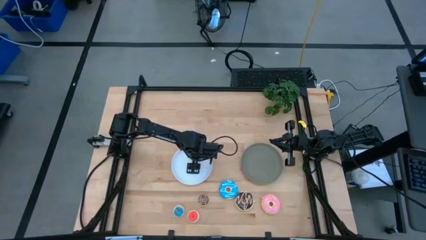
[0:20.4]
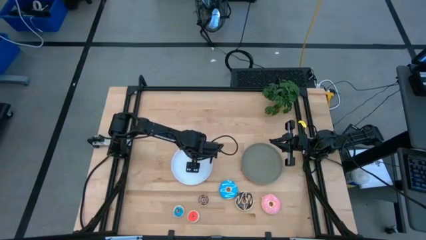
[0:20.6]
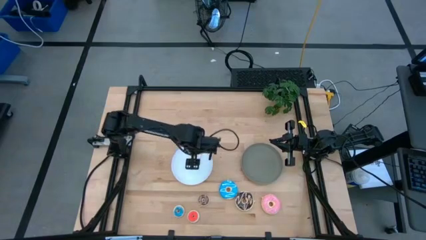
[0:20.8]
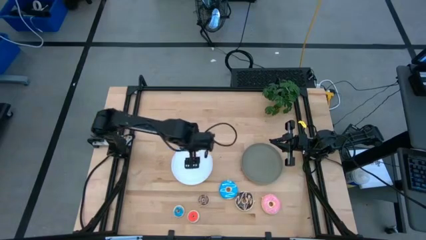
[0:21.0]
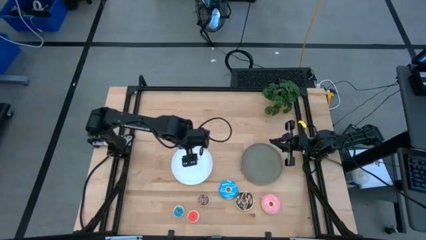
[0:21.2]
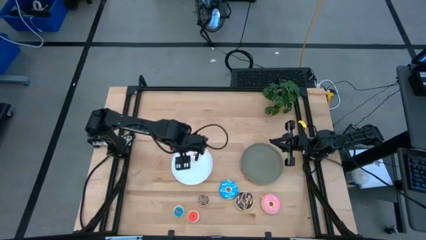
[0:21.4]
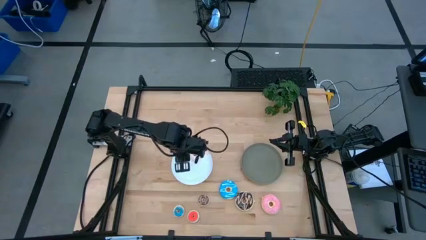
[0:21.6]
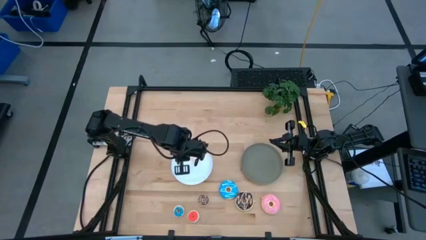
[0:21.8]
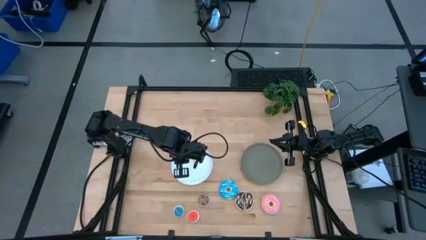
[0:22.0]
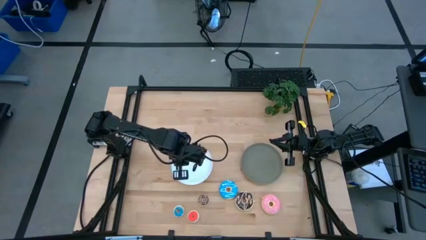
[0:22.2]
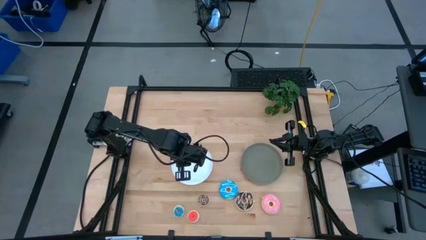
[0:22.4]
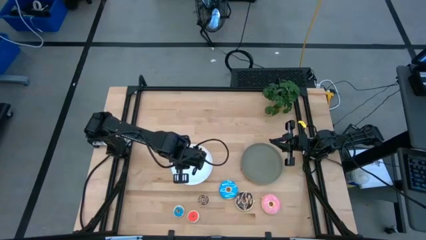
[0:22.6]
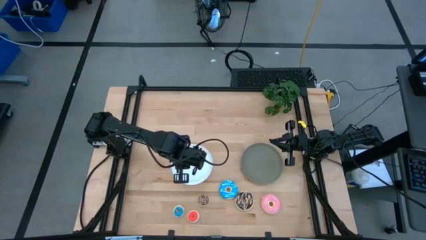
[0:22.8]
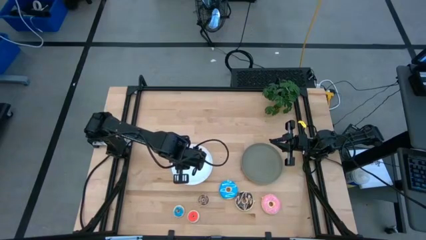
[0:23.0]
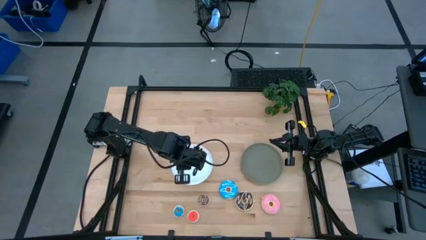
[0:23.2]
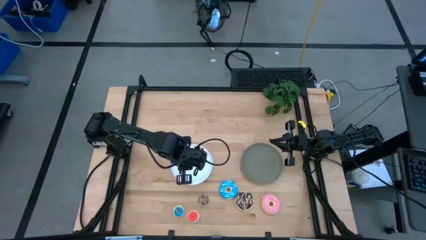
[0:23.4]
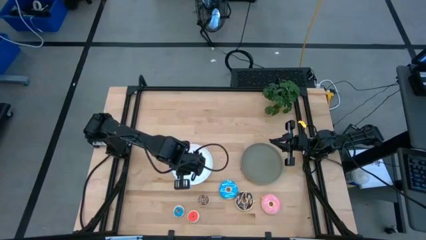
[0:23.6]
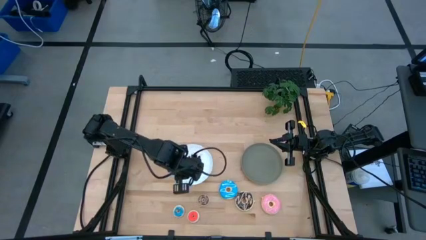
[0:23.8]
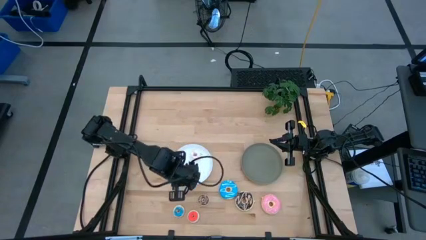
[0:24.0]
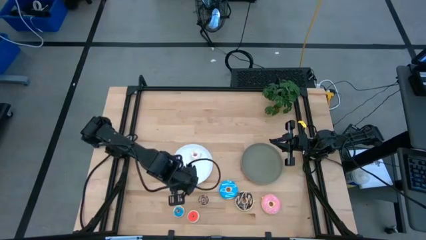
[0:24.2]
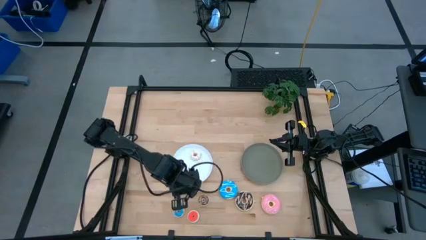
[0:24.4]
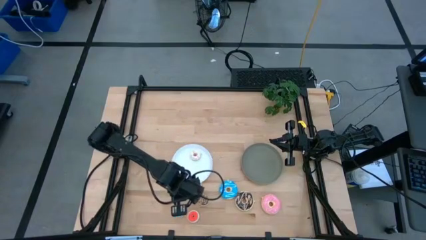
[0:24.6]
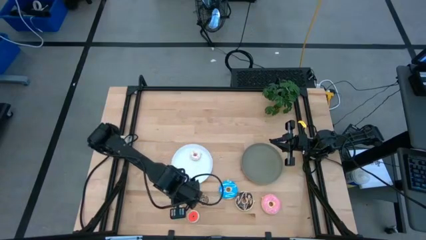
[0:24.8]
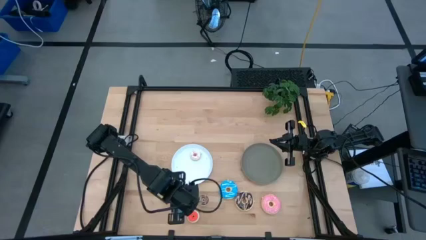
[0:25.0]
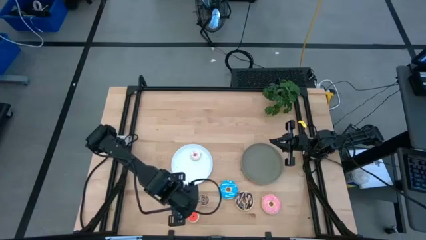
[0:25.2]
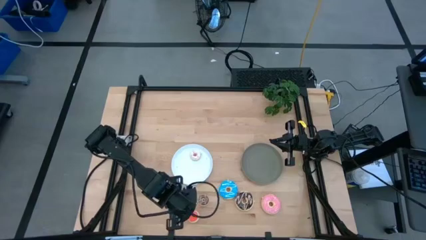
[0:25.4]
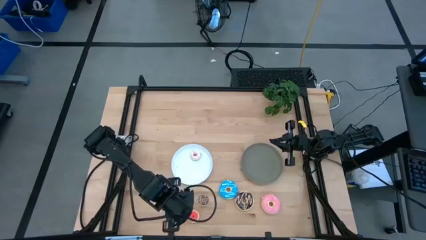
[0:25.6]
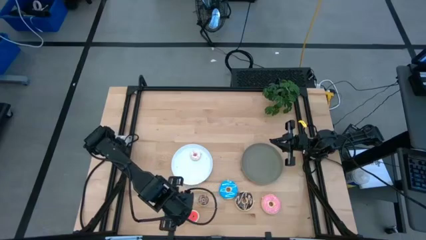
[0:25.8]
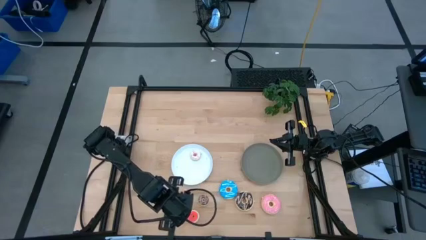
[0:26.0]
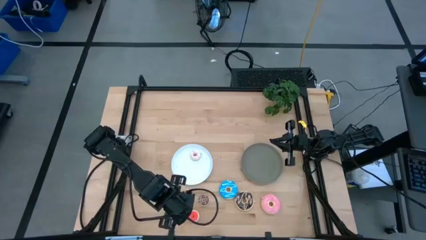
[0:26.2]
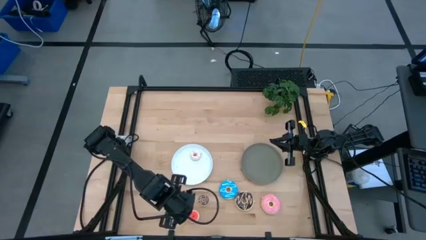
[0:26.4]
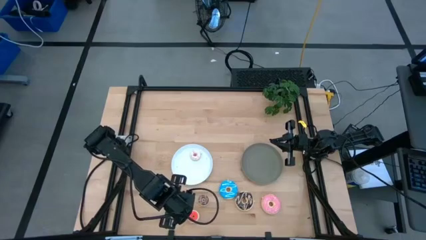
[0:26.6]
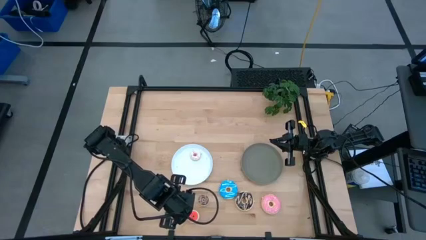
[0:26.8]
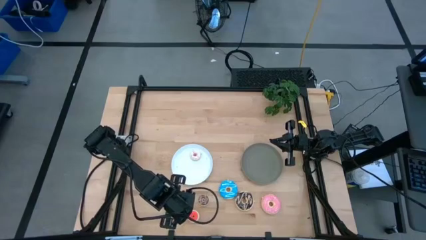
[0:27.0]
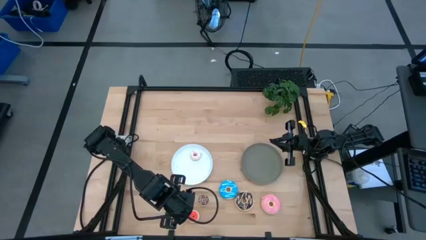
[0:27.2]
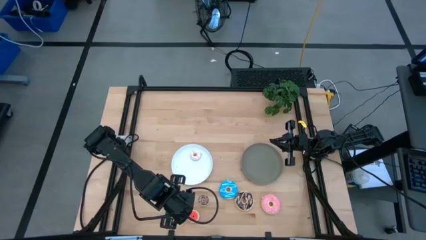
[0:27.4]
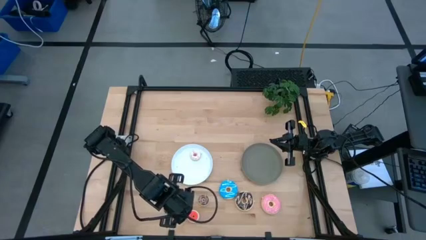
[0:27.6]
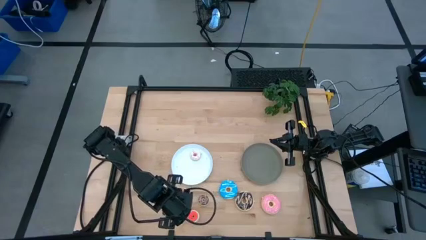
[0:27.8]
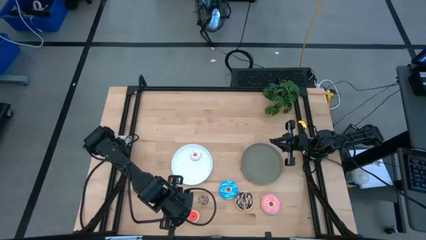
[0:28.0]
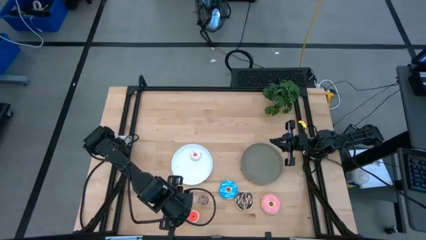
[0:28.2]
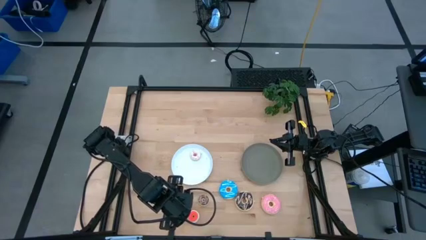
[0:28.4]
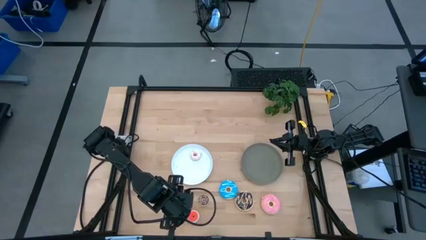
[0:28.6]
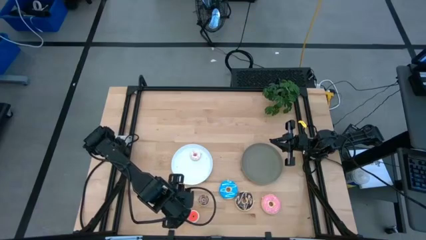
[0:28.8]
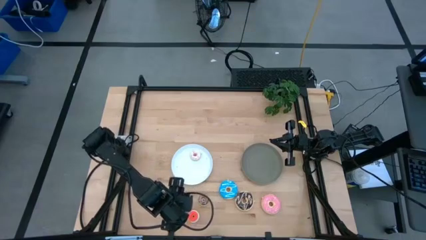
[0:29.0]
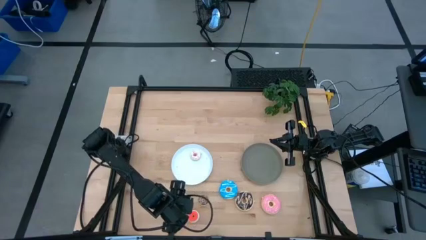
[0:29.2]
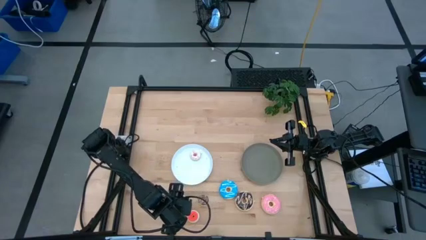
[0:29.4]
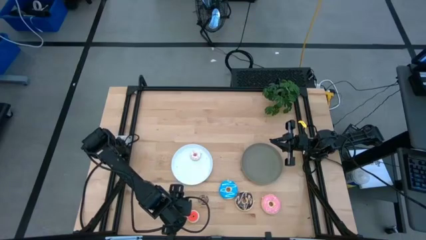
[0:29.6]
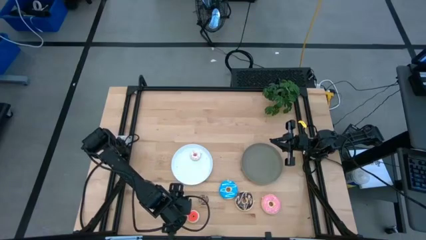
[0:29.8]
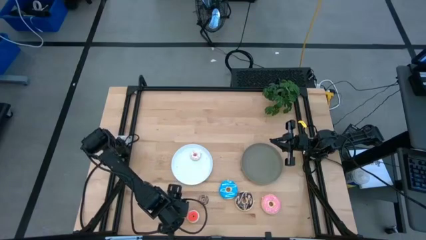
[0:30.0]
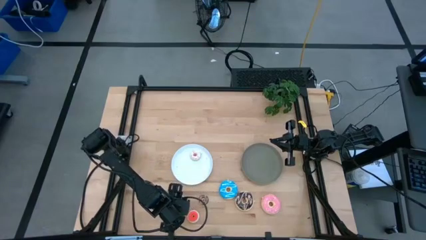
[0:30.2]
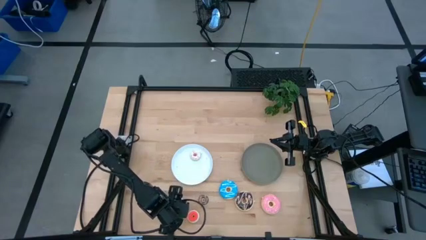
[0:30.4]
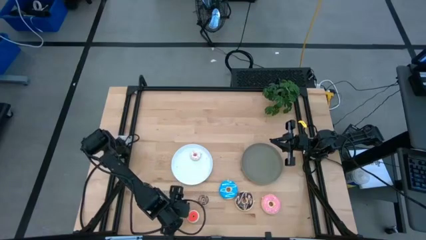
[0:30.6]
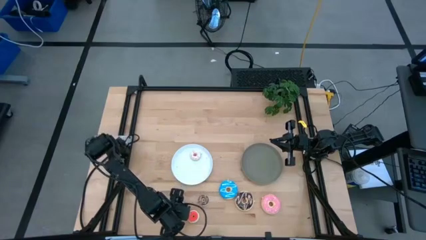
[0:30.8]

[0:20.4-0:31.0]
Task: Pick & Place donuts
Put the small blue donut on the white plate

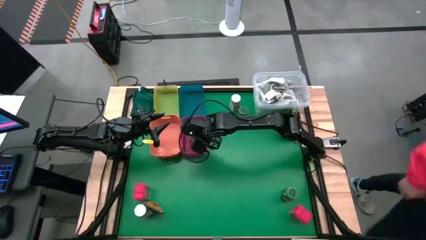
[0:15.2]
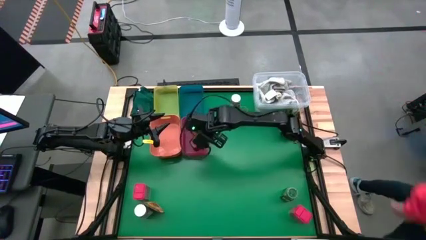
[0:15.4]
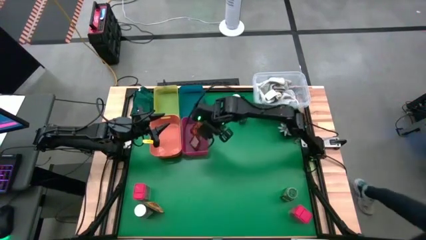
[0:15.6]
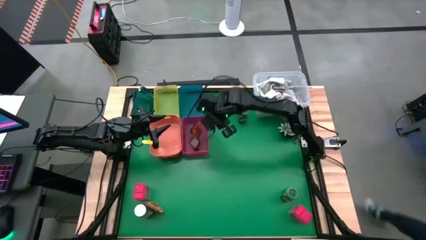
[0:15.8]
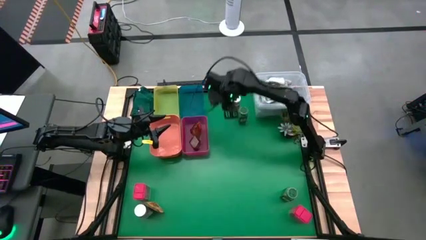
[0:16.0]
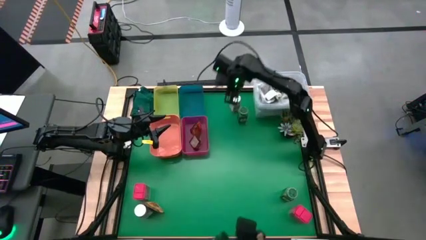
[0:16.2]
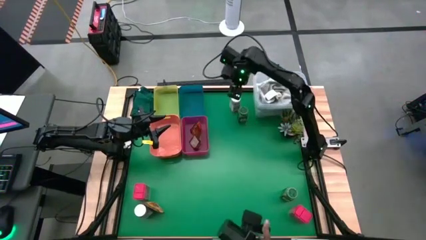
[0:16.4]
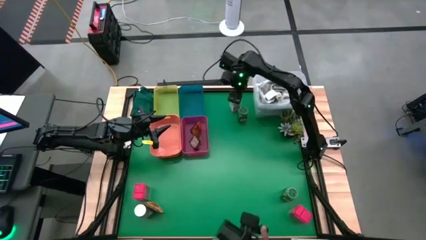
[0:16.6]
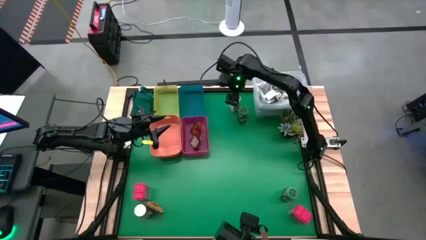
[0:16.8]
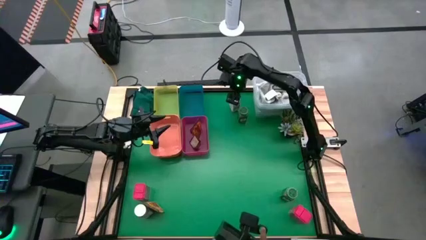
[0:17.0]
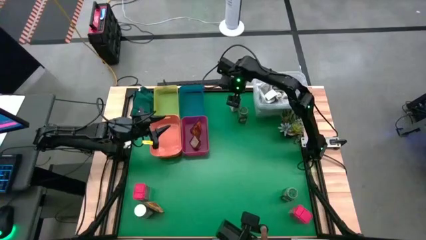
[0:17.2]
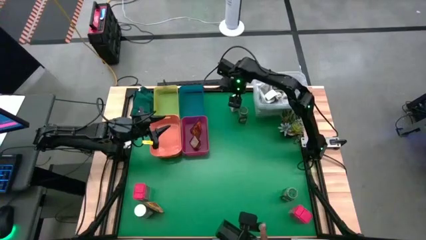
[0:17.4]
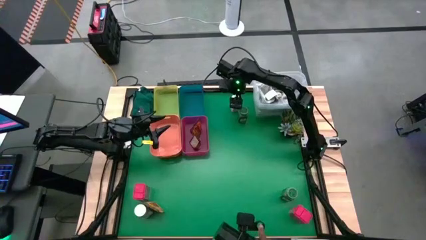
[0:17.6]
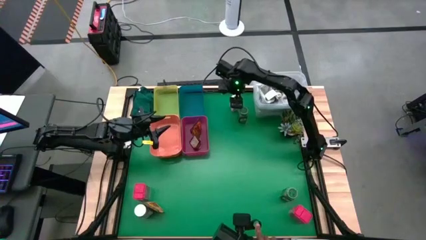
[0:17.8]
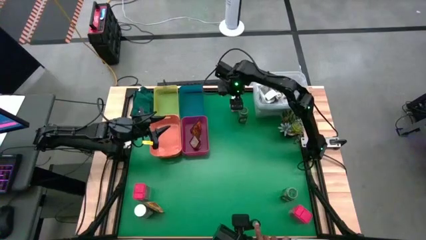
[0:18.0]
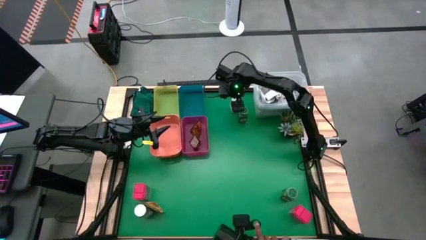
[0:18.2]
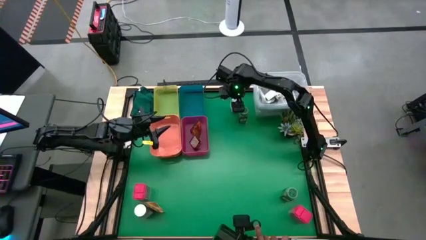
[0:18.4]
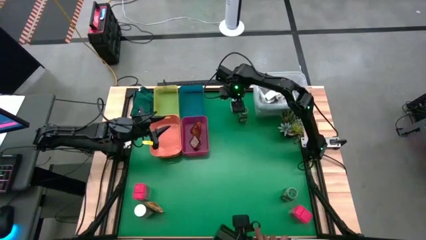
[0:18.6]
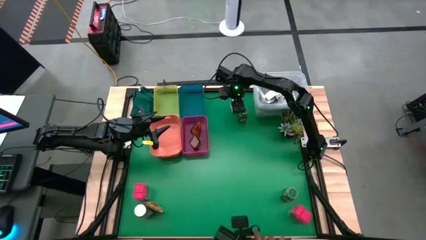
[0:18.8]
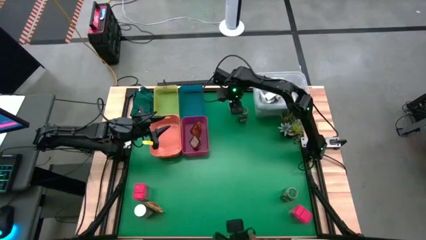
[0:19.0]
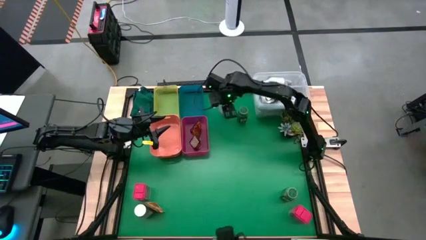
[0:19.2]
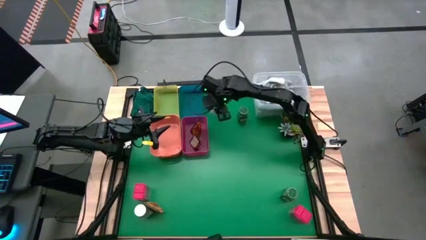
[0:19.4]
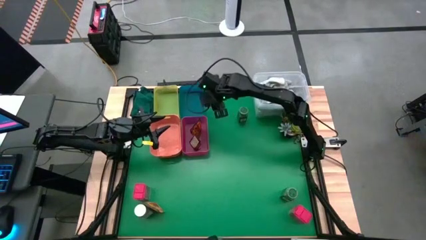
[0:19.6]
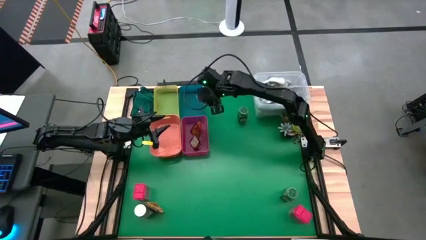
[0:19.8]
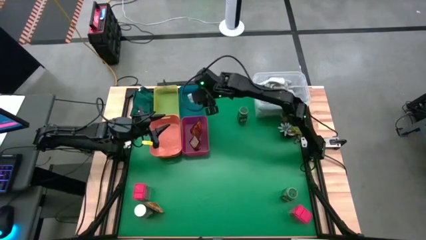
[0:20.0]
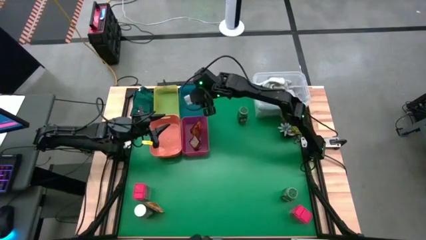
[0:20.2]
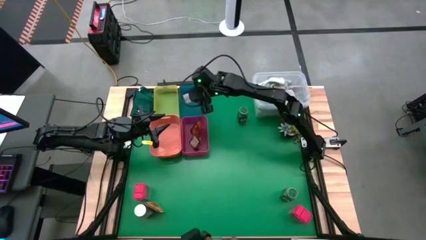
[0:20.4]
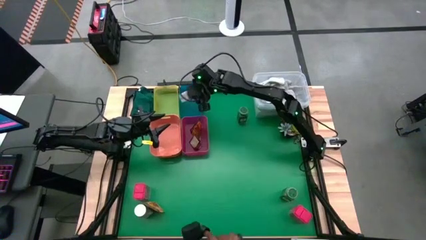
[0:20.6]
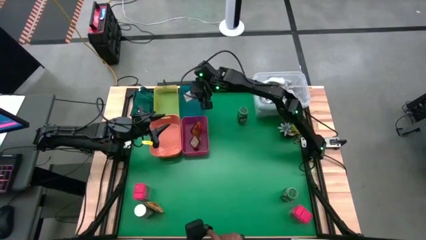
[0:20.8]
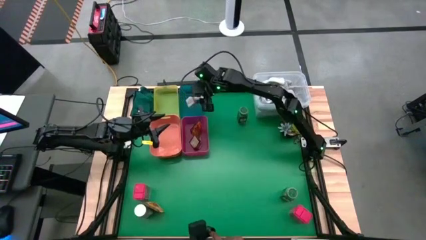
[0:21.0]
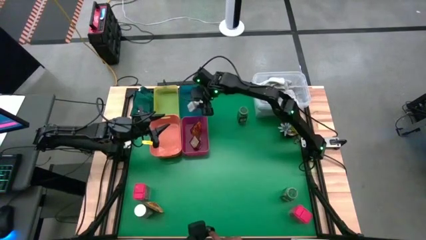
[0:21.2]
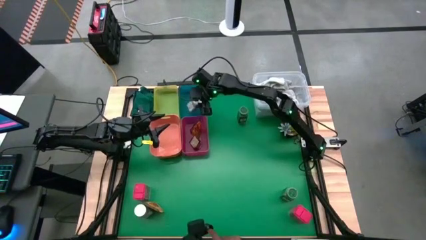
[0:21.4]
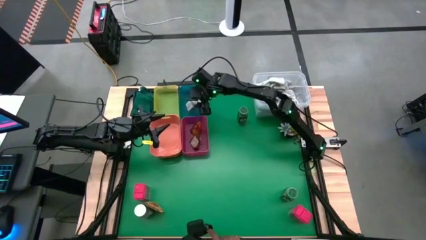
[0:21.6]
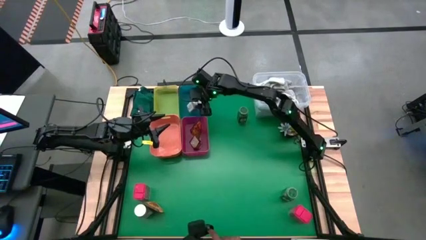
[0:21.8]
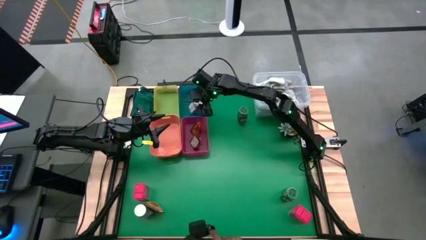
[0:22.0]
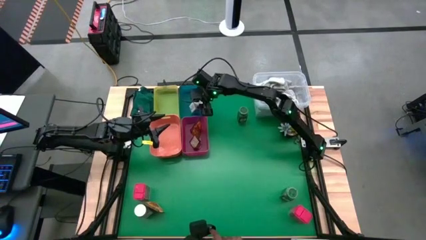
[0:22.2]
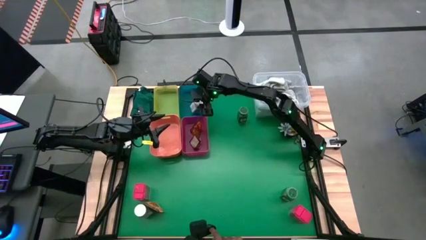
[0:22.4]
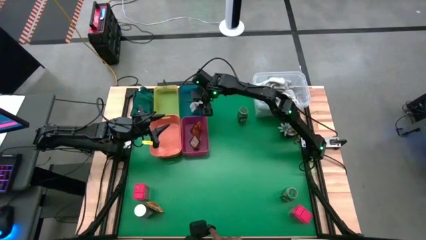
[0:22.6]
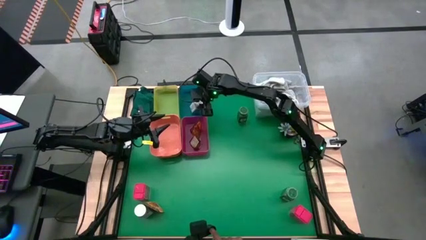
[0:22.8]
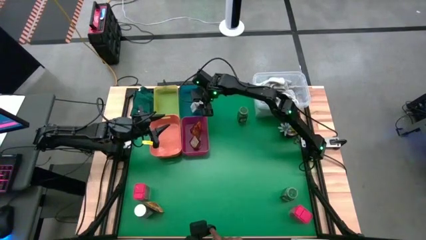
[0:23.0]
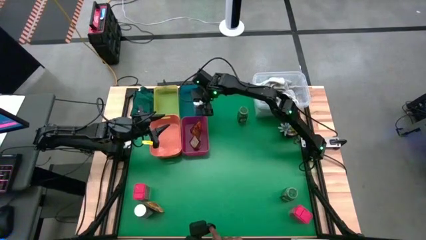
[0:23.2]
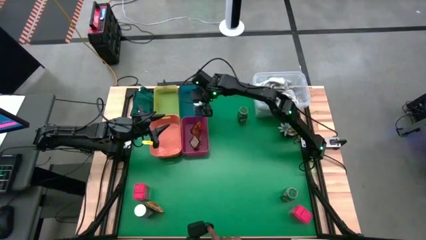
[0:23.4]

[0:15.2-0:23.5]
Task: Sort spices by type
Put the top white seasoning bottle into the blue bin
